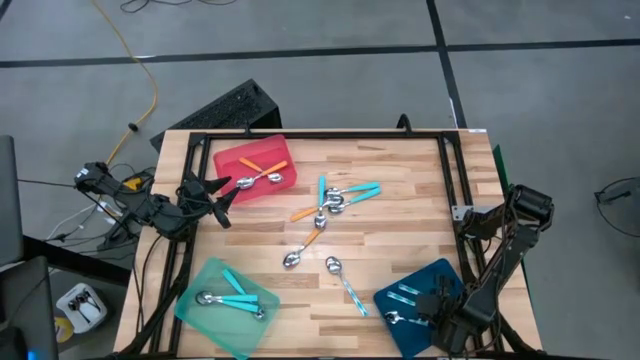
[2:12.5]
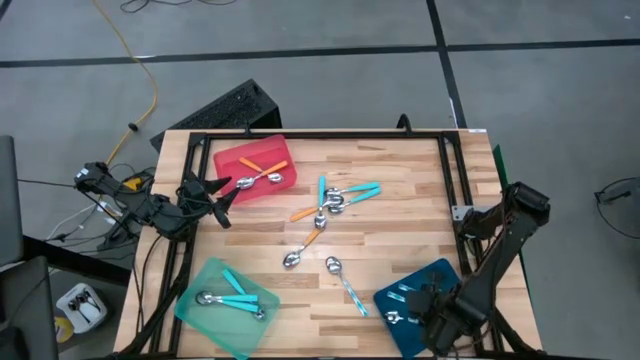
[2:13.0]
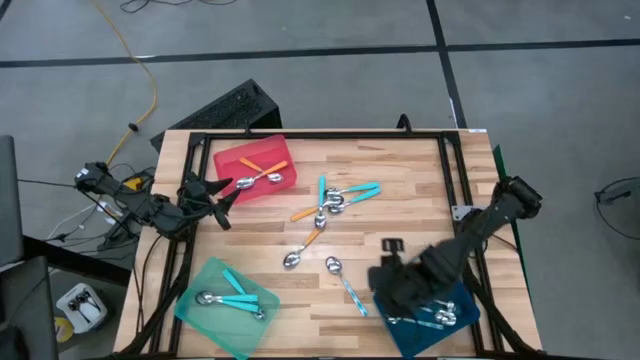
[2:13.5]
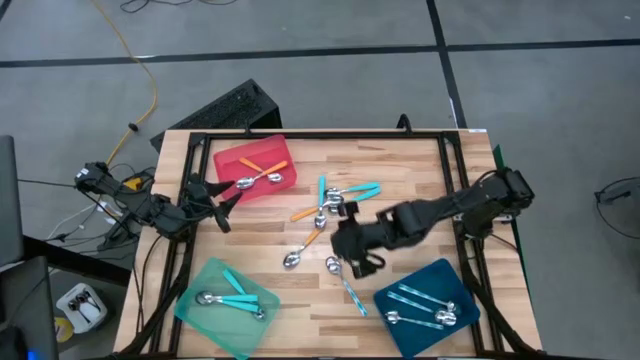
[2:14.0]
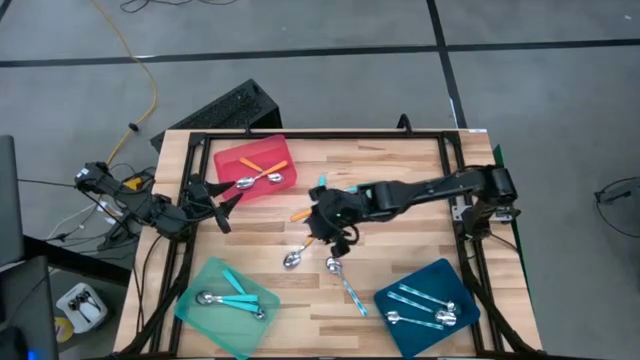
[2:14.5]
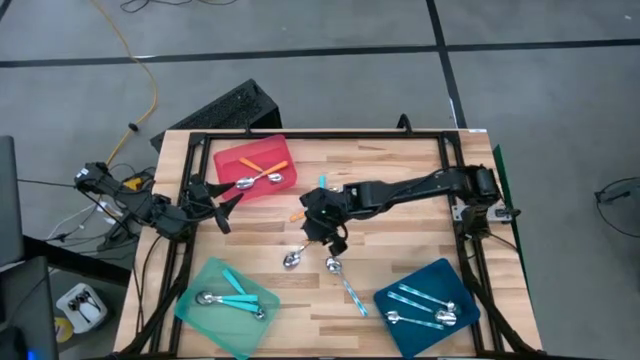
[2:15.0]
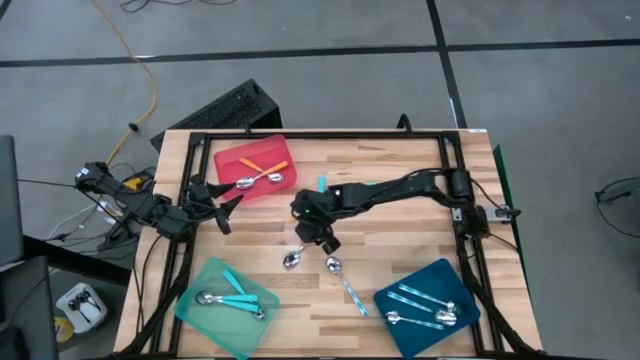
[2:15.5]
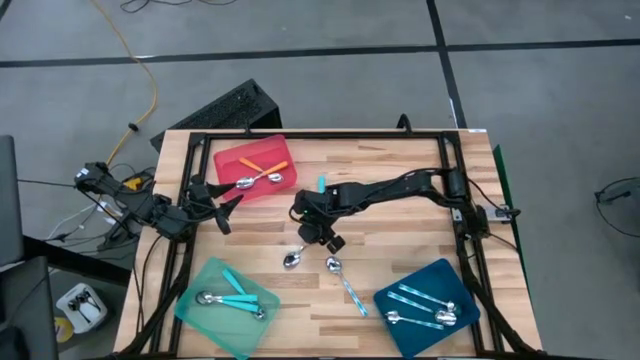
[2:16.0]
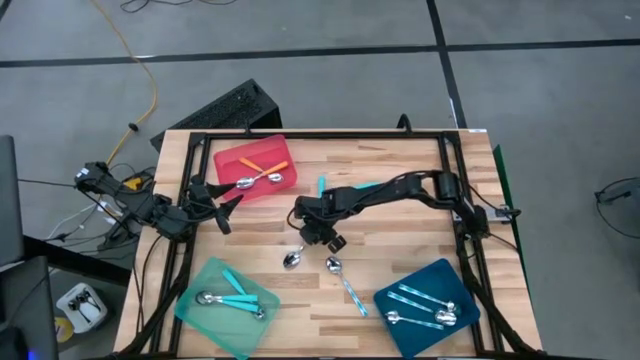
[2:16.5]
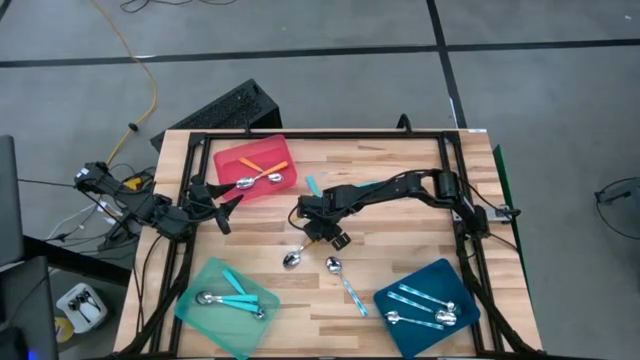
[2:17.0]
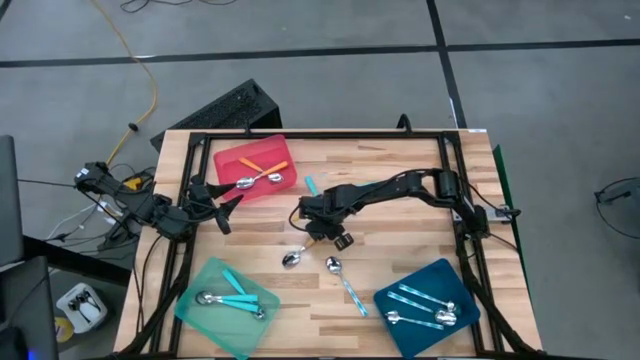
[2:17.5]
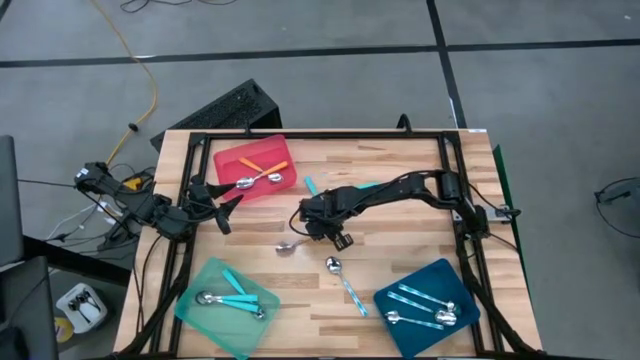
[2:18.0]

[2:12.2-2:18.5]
Task: Sort silverware by color (type)
Put the yellow spoon into the pink bin

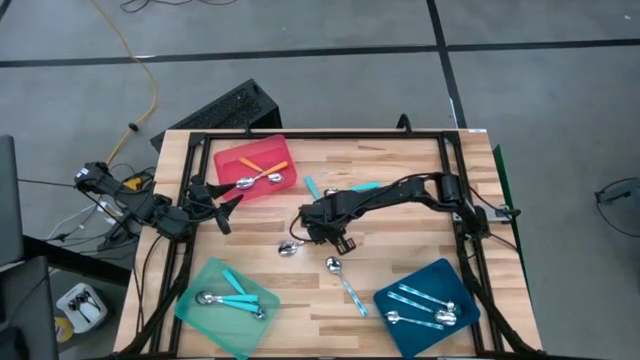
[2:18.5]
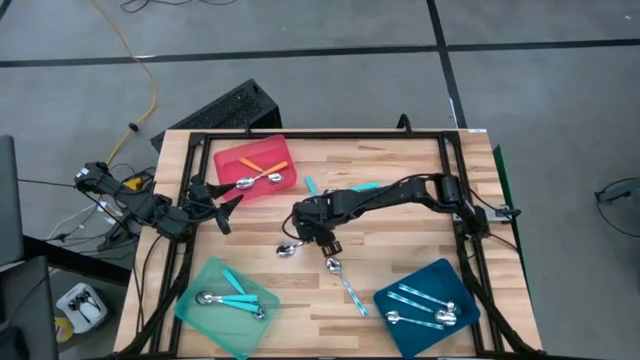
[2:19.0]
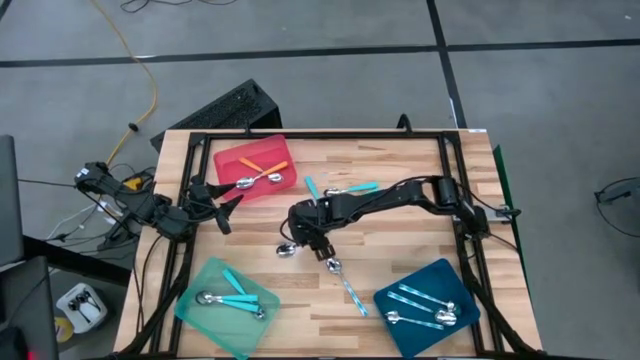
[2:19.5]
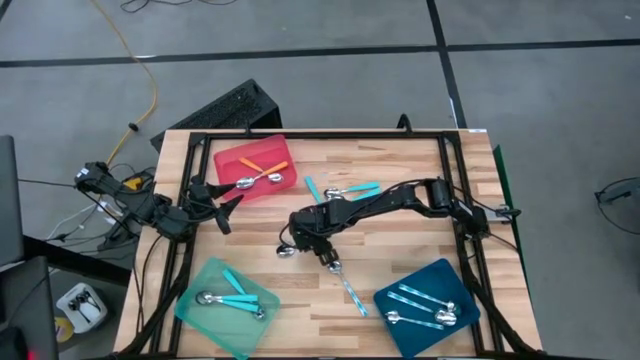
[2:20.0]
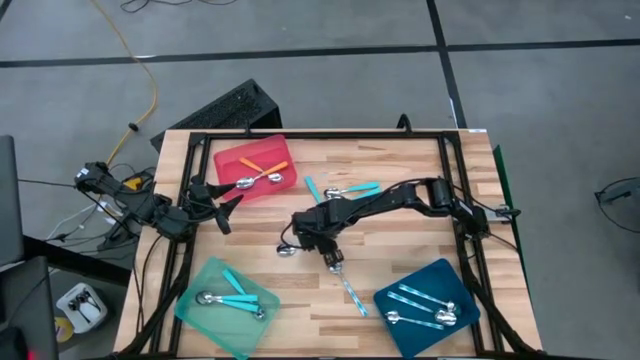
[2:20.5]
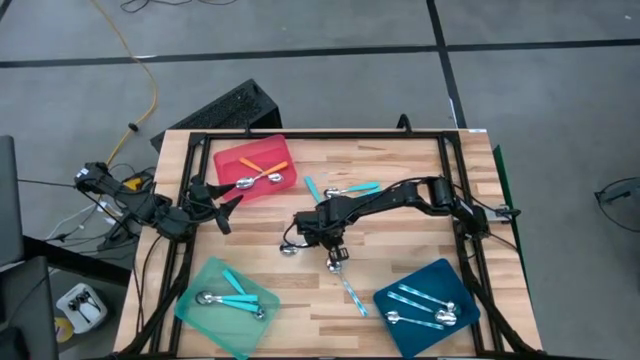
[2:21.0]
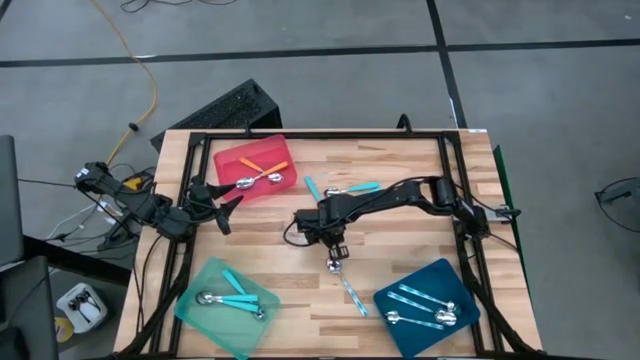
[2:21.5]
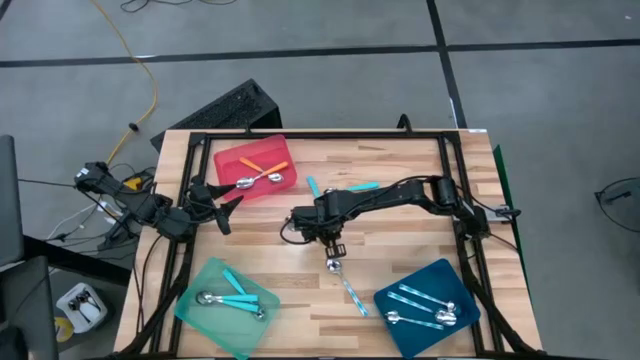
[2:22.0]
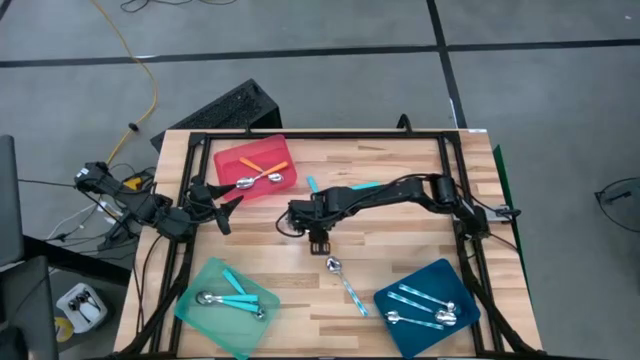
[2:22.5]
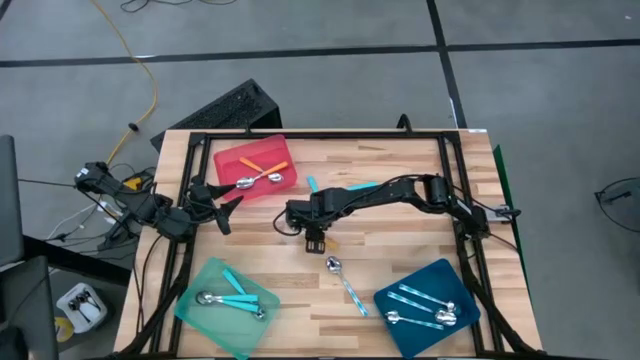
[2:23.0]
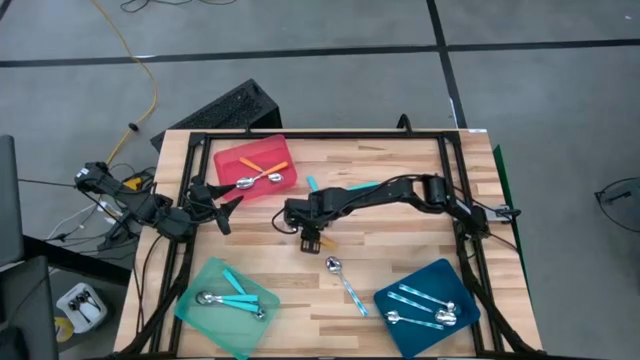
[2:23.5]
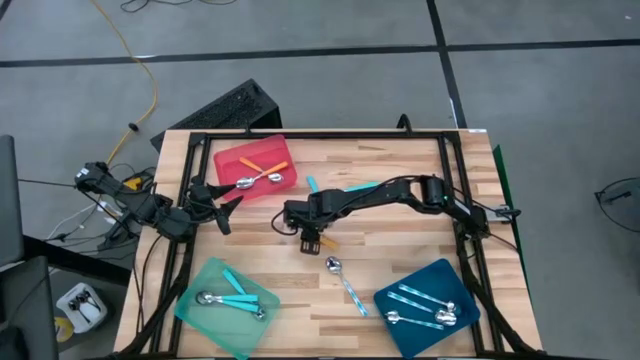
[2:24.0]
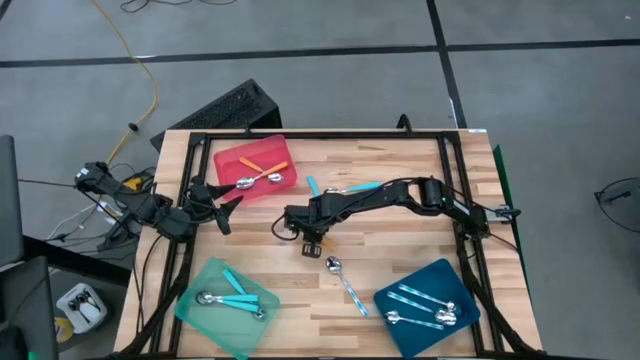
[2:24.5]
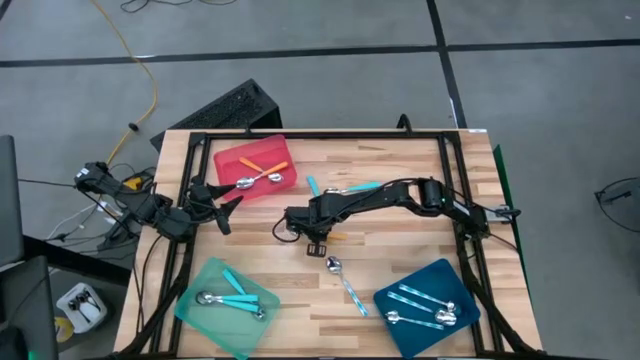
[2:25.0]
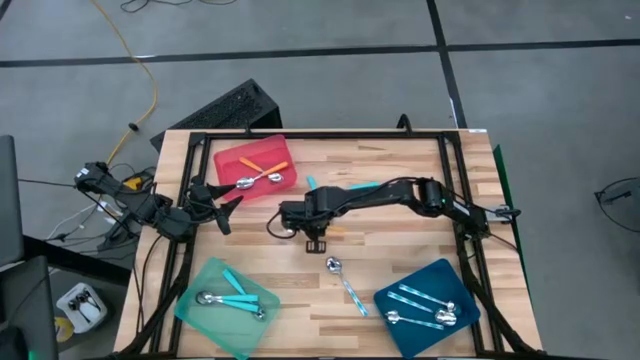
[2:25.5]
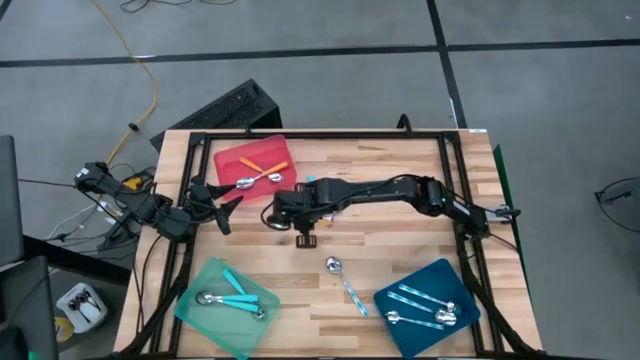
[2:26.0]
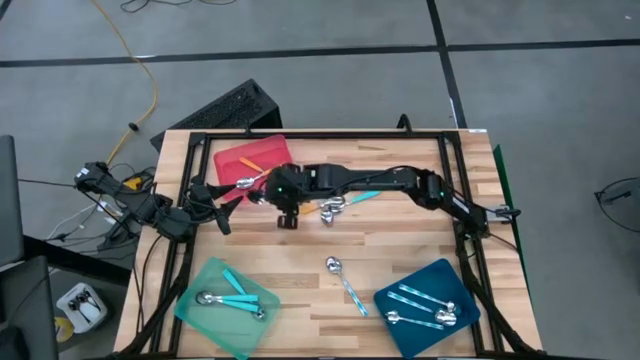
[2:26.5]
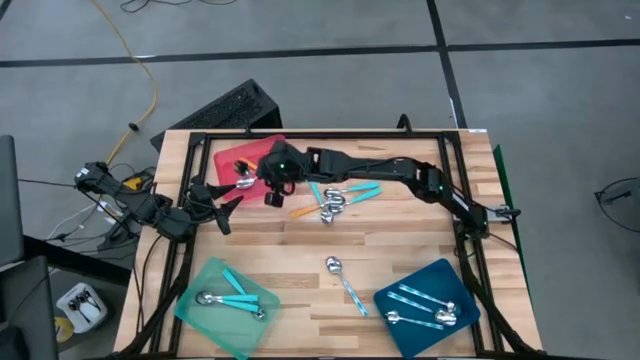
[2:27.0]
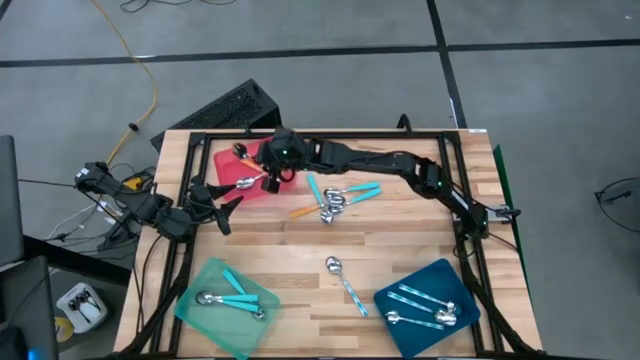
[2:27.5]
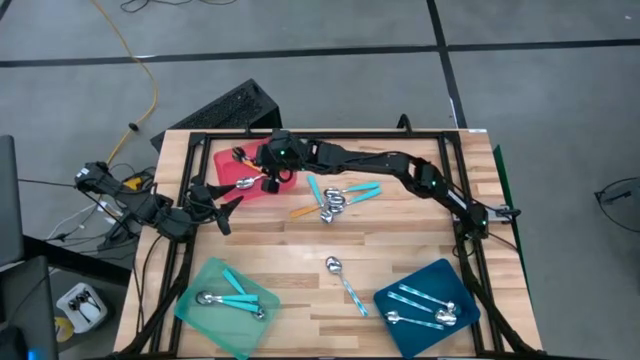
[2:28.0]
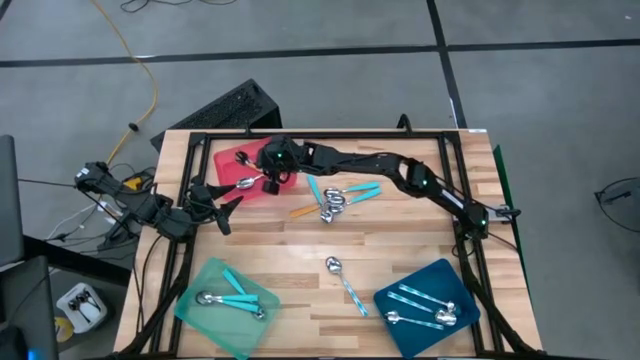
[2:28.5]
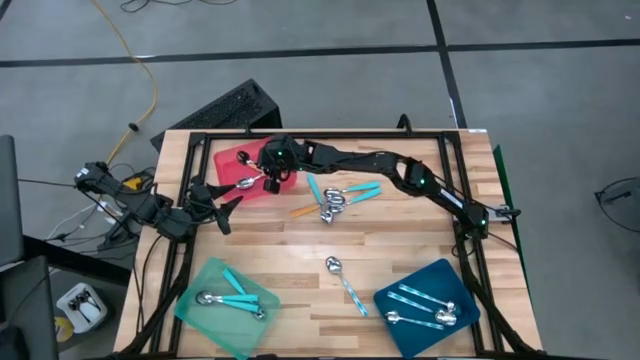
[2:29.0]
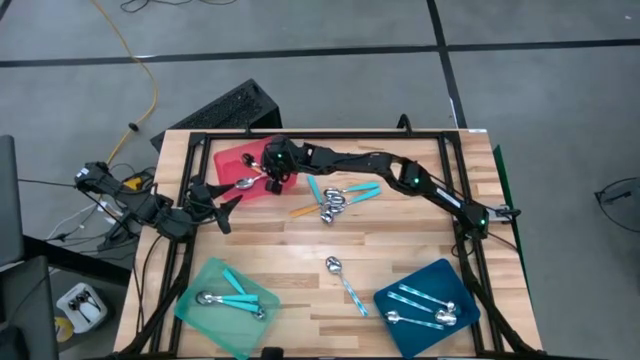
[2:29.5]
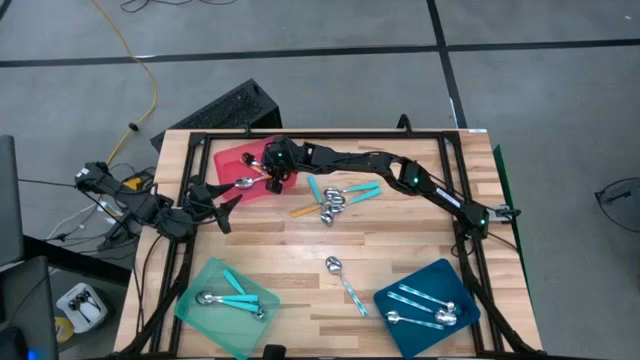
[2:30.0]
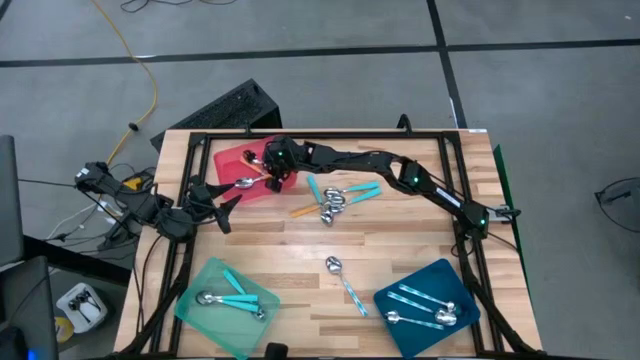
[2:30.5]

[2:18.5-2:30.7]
Put the yellow spoon into the pink bin

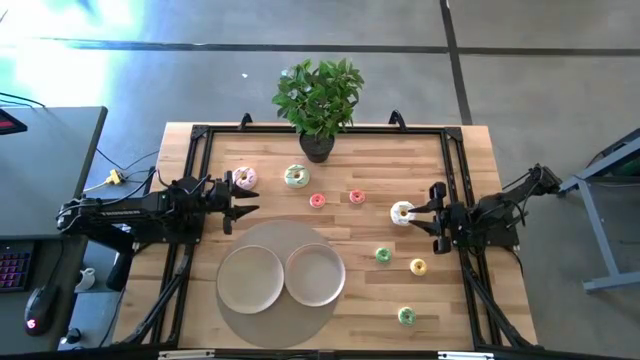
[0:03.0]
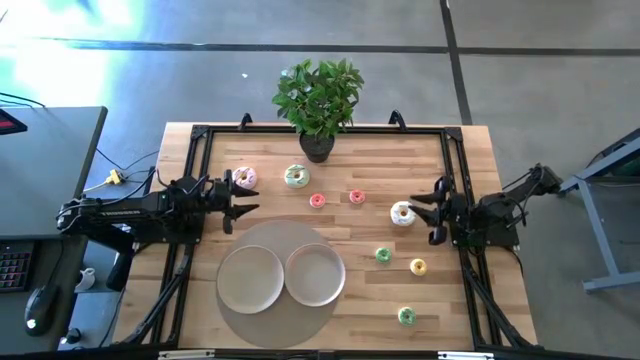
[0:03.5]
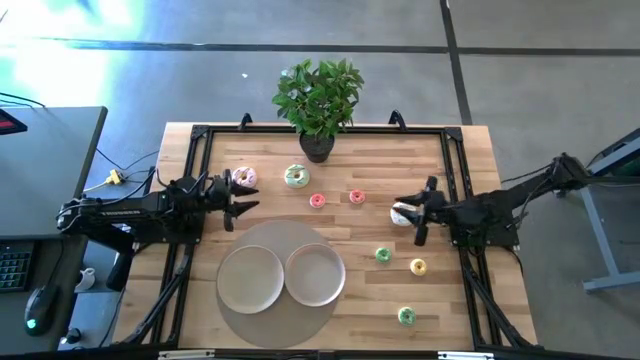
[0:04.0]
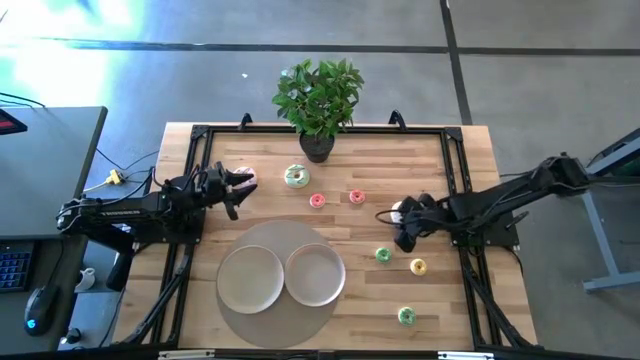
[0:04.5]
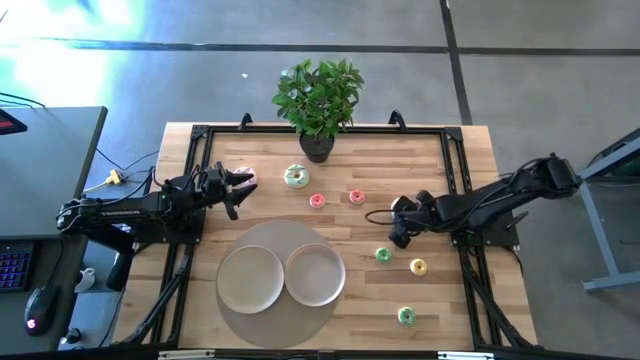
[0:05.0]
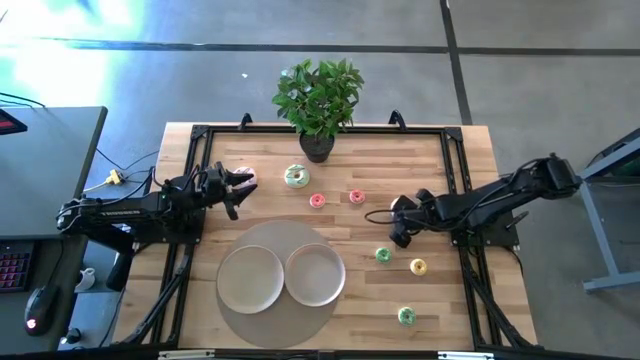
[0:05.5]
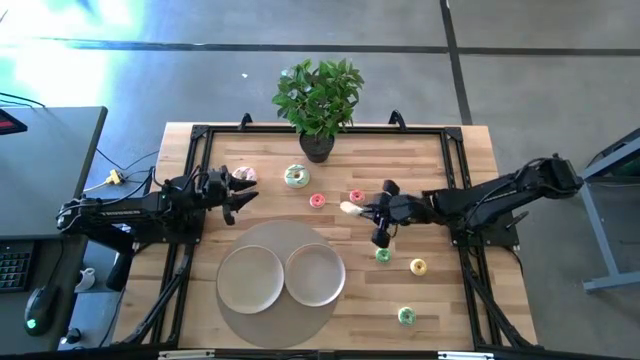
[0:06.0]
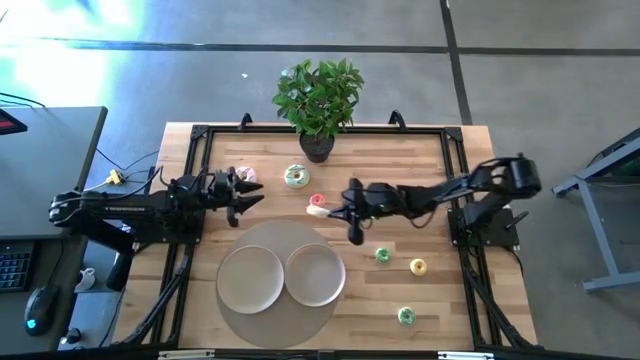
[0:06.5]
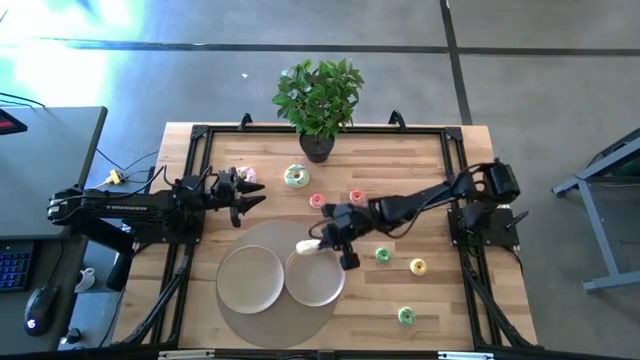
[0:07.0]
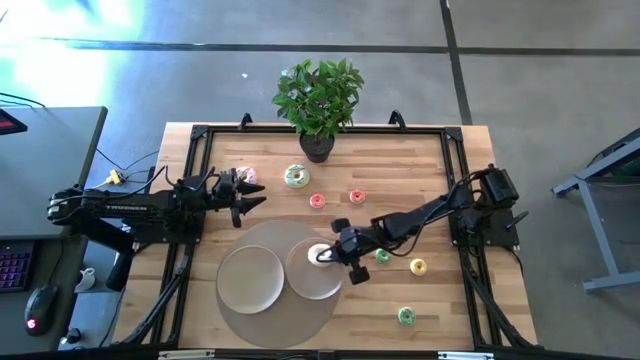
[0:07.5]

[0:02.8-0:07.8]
Task: Pick & Place donuts
Put the large white donut on the right white plate
